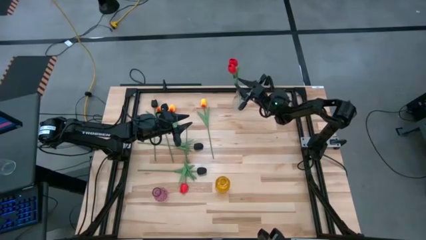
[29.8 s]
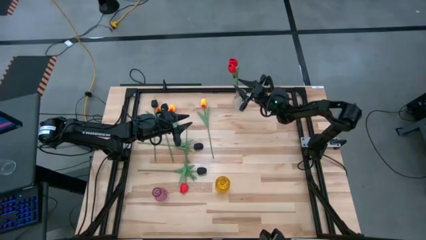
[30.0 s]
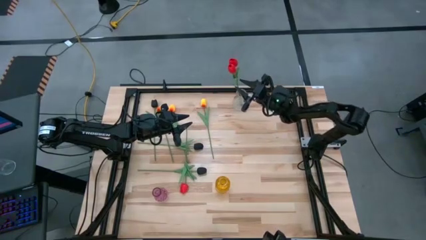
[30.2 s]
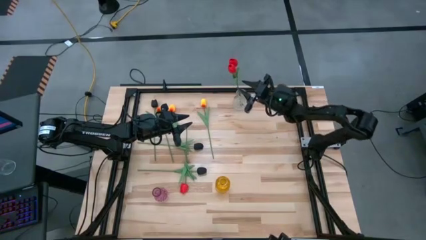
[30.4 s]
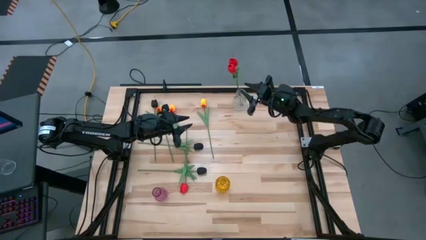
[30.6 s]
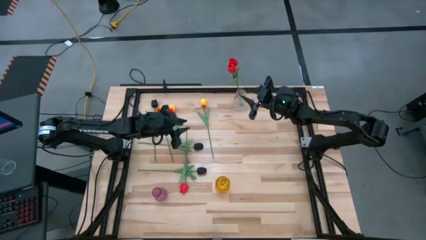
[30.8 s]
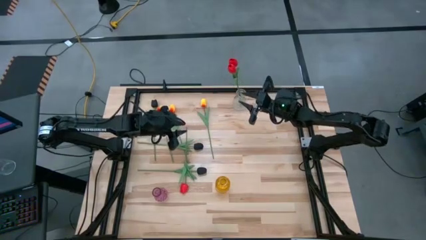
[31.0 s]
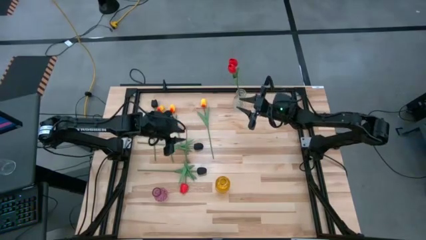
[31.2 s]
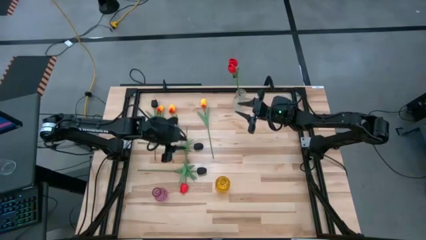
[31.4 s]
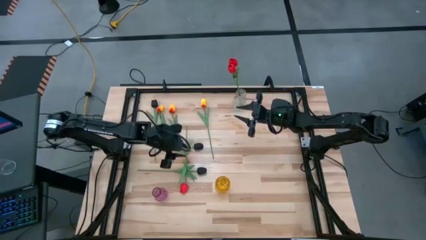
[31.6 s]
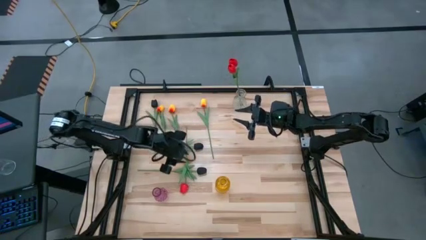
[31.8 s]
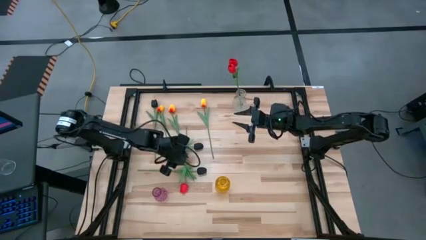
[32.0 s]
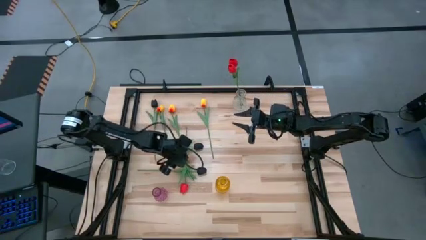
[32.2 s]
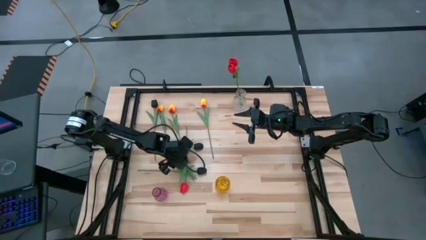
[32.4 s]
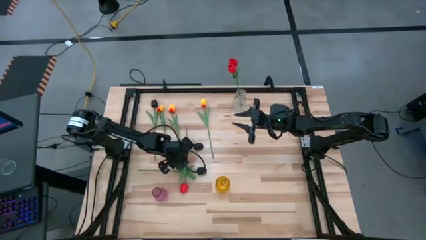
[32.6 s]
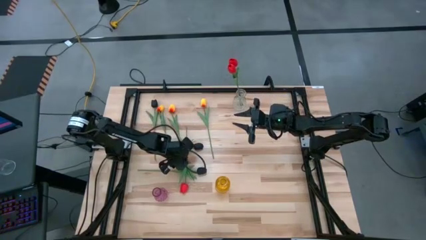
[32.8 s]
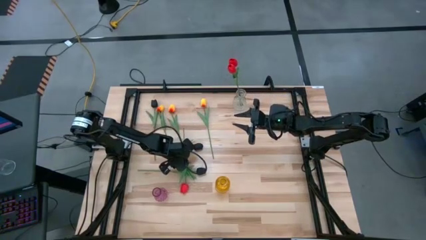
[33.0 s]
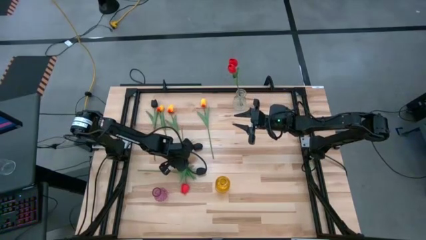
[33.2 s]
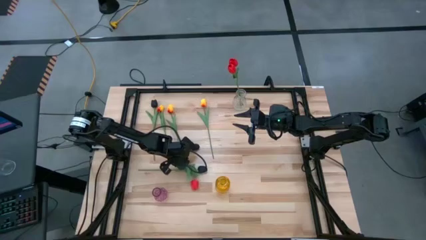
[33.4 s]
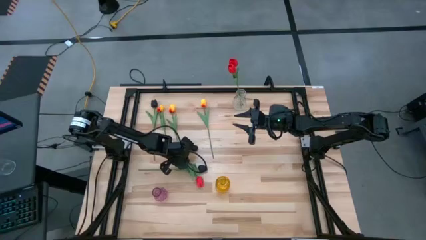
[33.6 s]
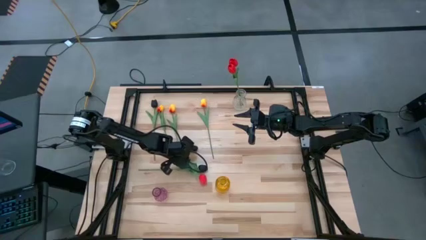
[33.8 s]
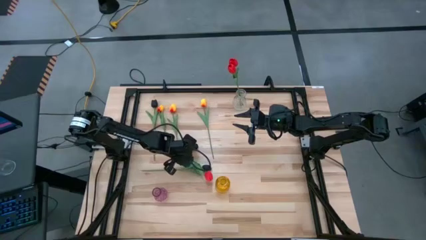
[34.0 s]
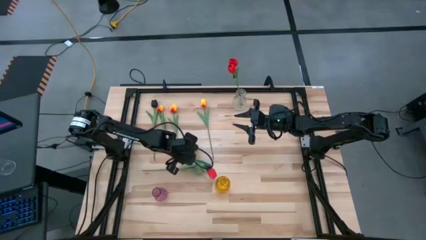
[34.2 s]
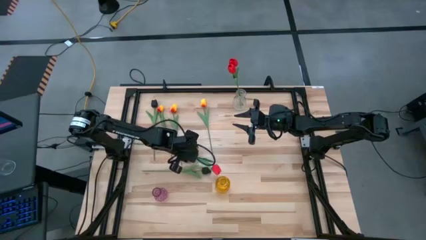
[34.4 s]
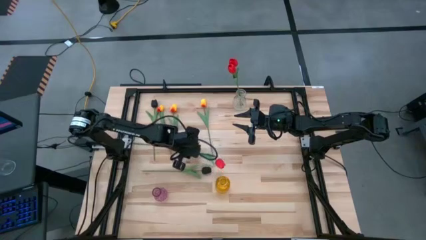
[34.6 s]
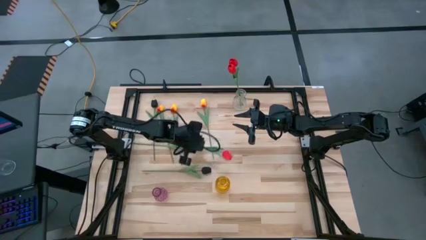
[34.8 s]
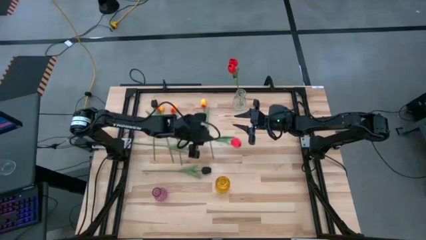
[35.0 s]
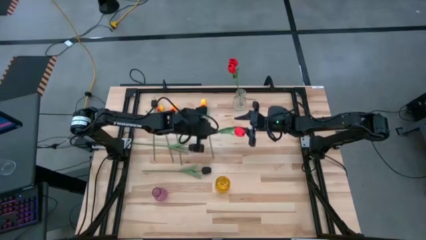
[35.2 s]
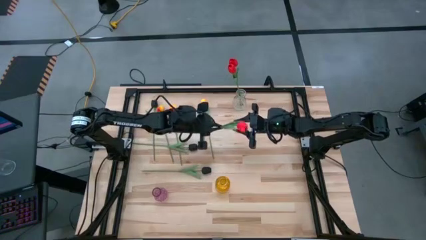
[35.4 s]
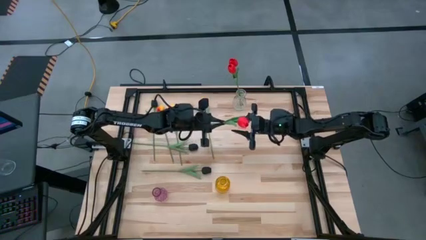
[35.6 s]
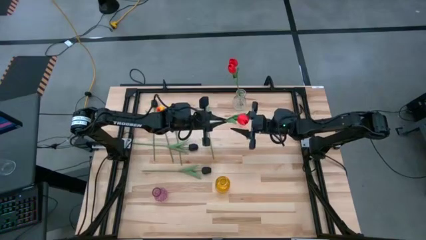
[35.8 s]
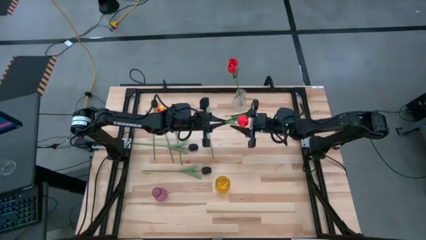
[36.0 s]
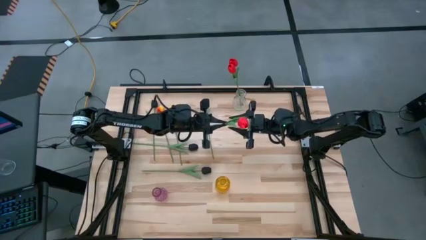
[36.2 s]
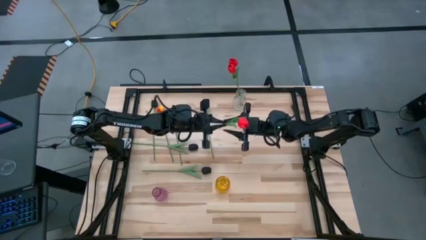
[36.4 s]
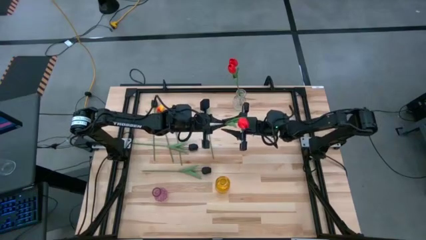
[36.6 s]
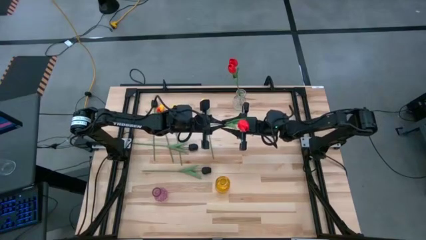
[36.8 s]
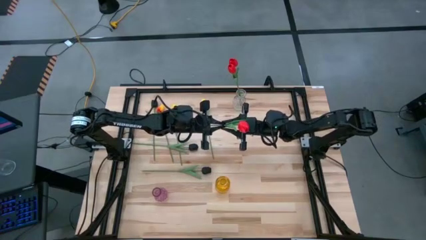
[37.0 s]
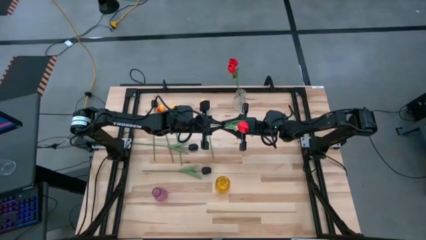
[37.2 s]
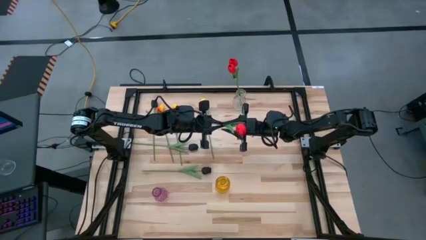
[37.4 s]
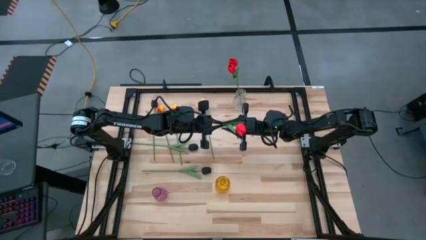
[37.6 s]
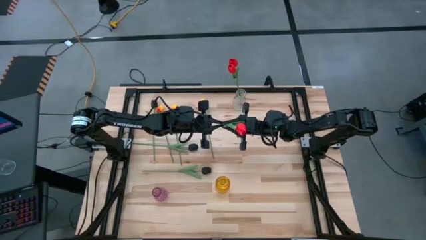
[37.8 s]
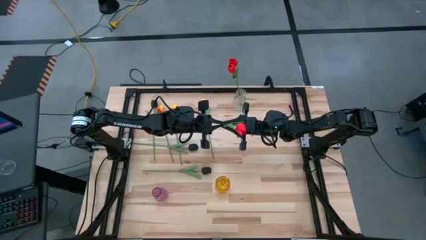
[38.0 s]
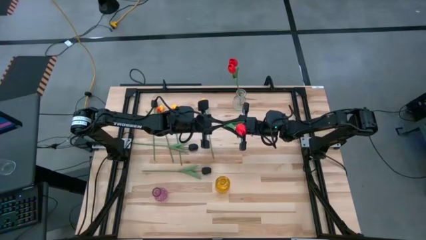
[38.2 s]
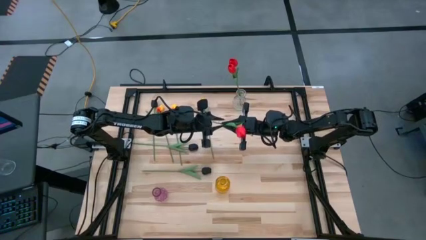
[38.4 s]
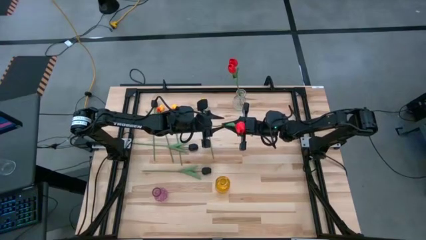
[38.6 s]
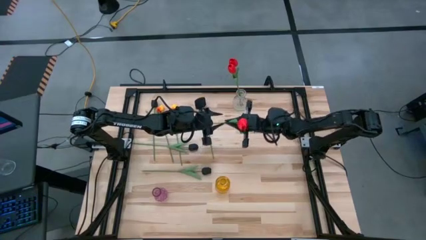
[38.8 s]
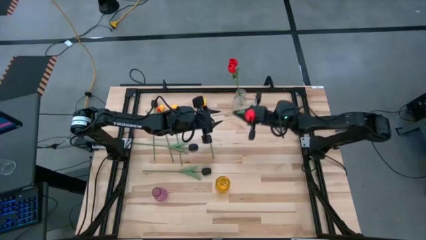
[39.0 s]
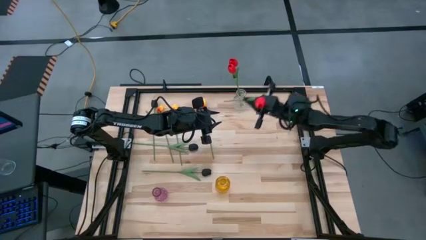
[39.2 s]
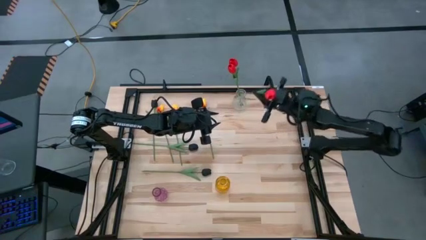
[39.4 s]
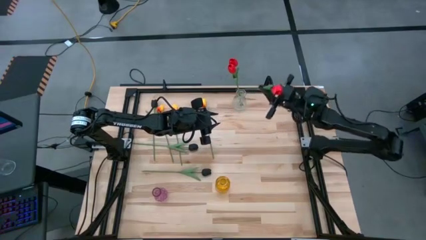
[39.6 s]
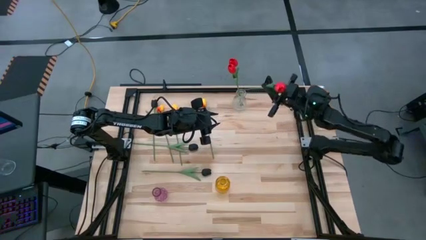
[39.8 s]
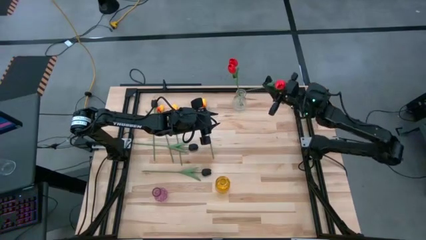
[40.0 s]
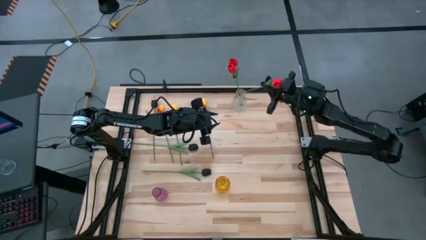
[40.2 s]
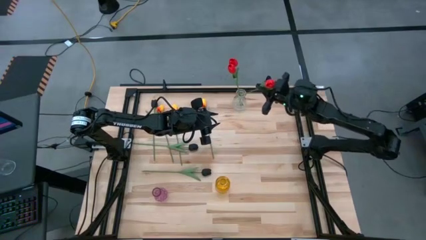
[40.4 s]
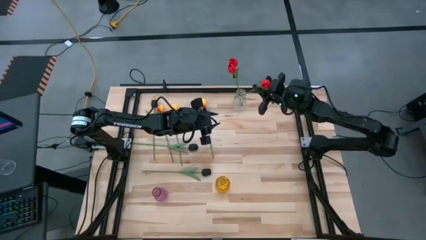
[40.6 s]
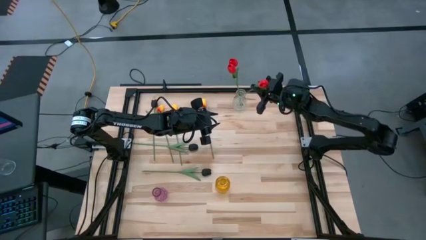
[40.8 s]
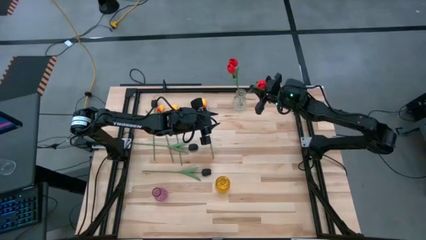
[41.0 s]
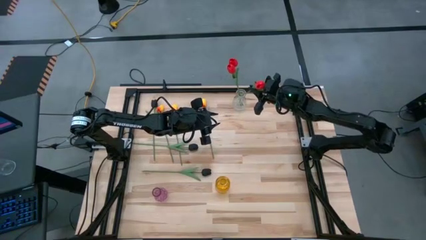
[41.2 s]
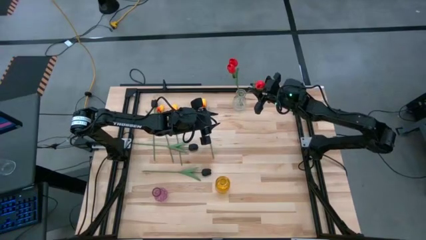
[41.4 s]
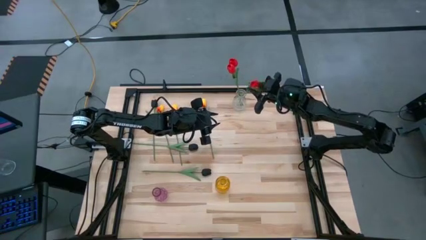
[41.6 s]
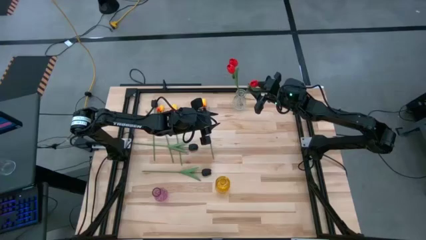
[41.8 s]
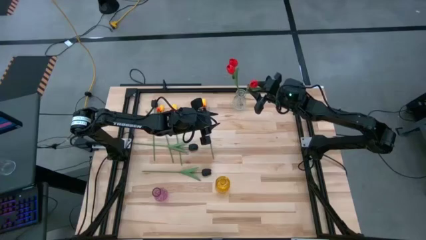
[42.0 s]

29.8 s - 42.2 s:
Task: Sort flowers into vase by color
Put the red flower into the transparent vase

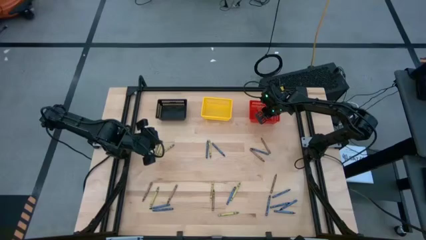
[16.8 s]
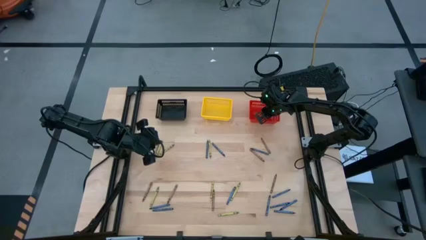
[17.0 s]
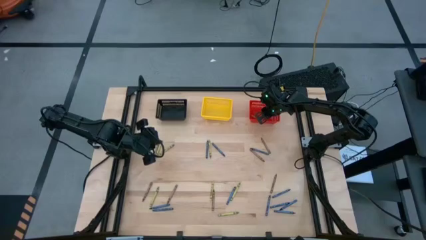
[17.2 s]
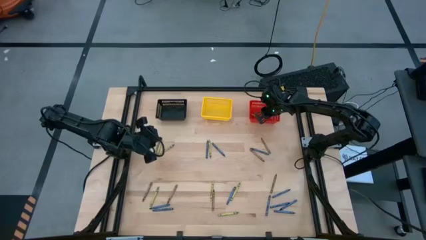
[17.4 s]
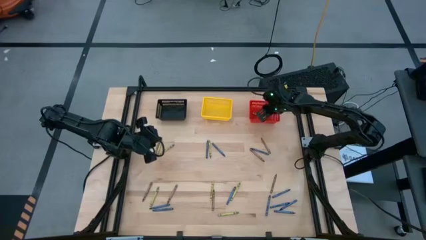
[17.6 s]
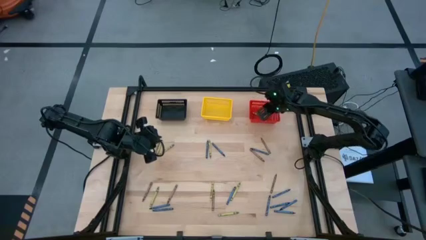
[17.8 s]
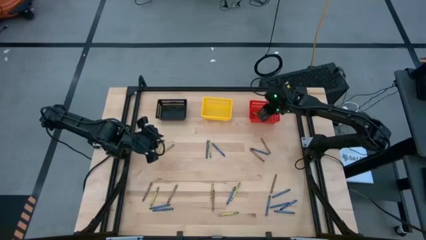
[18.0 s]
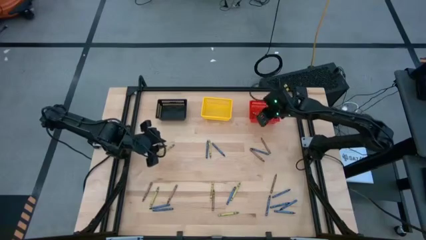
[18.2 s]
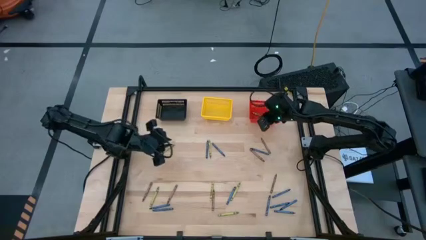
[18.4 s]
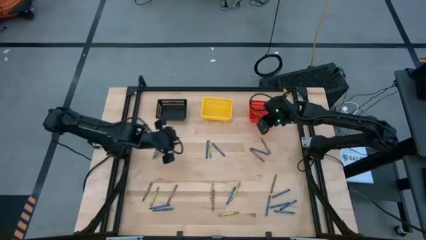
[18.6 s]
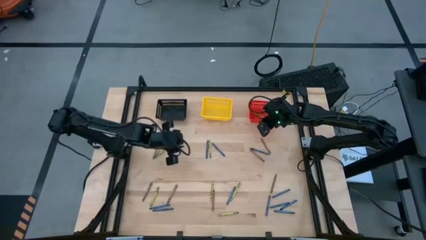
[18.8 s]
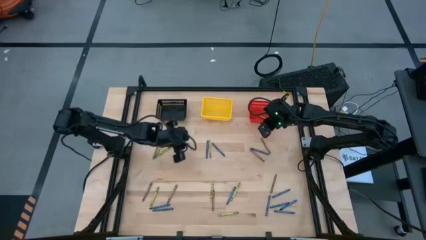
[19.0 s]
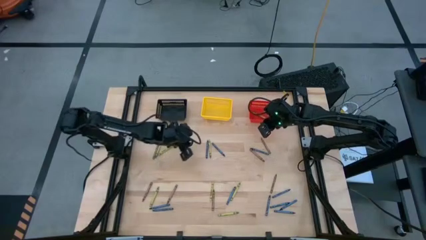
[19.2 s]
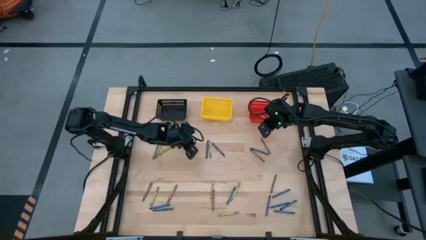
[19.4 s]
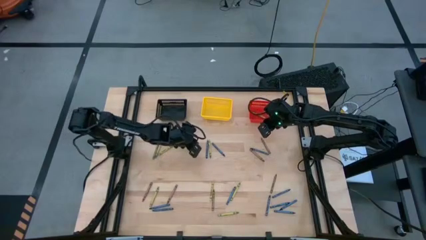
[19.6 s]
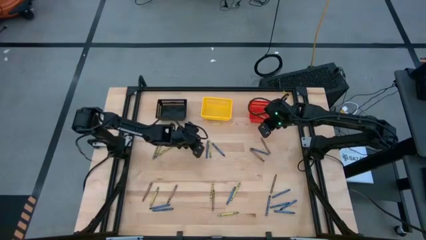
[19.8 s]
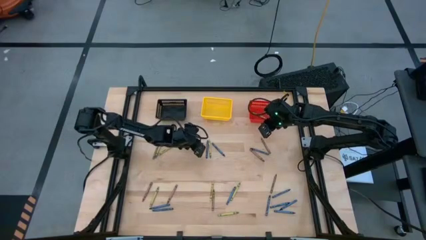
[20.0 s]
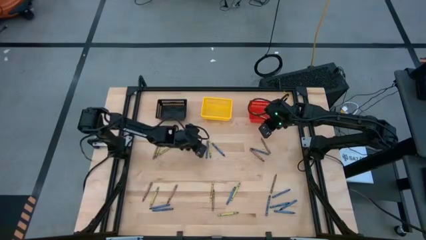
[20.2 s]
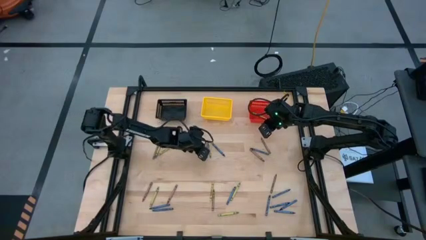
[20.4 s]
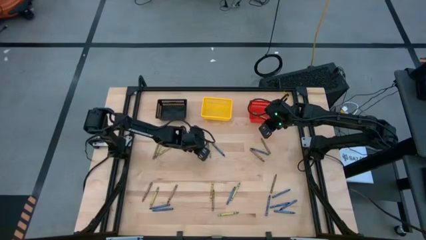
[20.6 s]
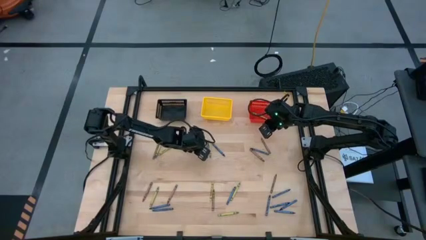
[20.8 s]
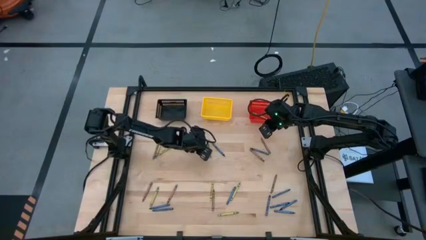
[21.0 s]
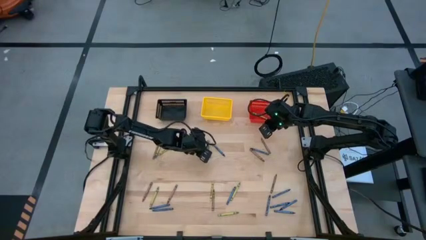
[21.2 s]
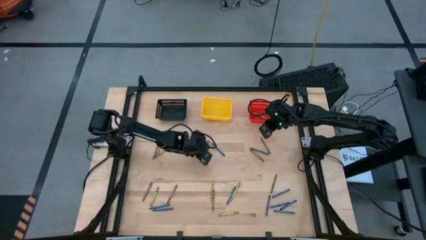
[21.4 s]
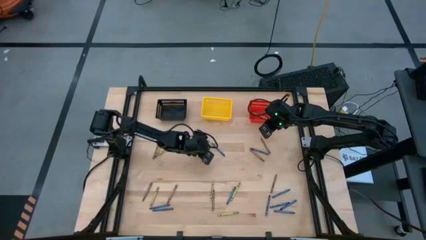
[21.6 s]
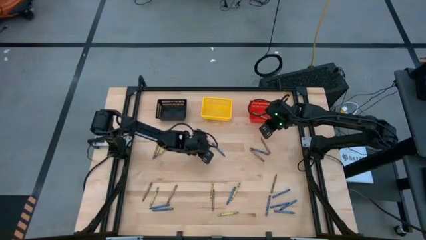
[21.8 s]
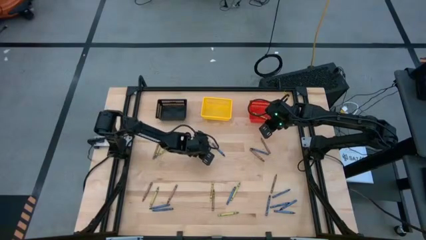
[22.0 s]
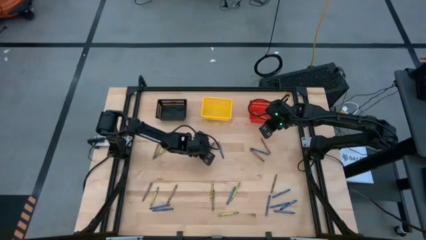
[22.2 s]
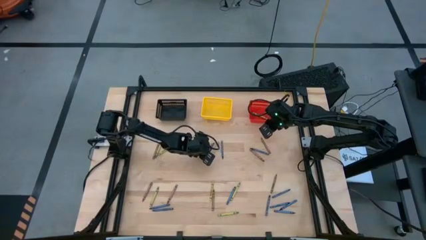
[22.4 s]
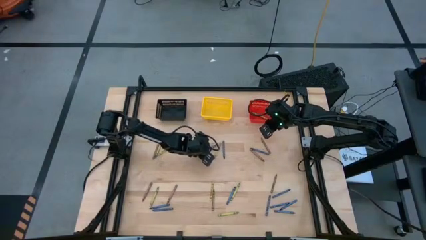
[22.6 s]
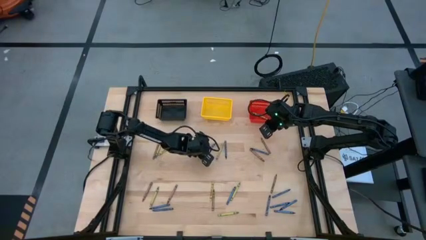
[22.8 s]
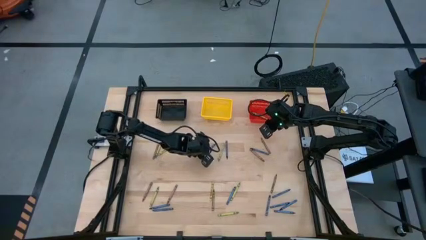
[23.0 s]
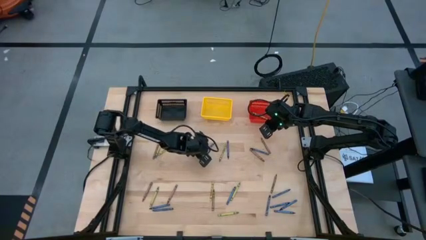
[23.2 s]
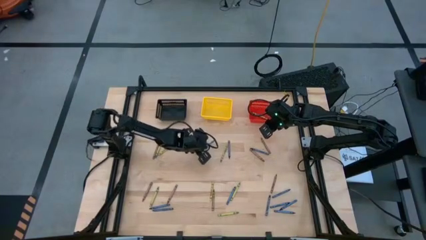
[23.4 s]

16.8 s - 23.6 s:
Task: Sort crayons
Put the blue crayon into the black bin
